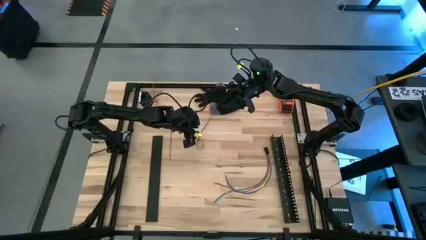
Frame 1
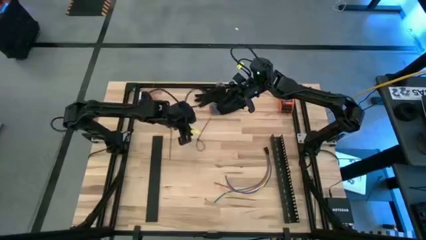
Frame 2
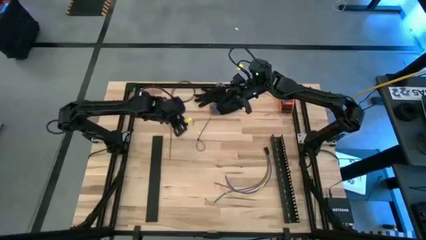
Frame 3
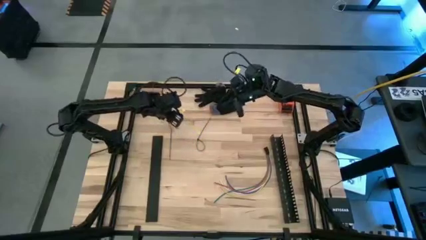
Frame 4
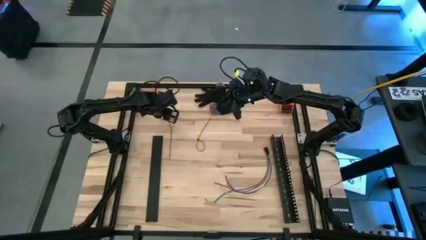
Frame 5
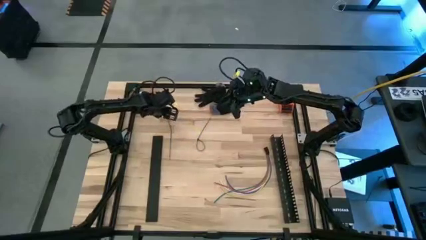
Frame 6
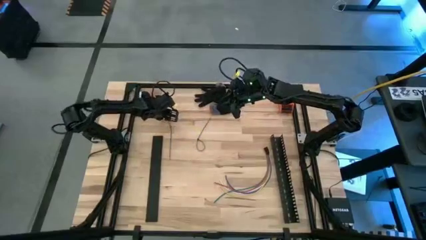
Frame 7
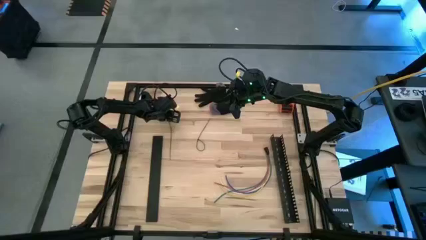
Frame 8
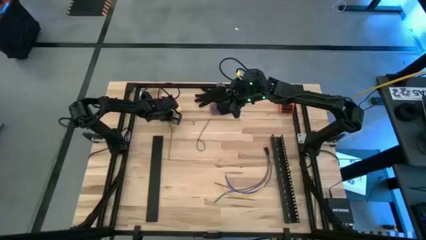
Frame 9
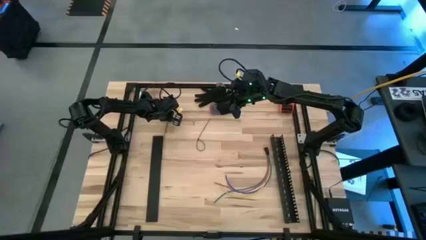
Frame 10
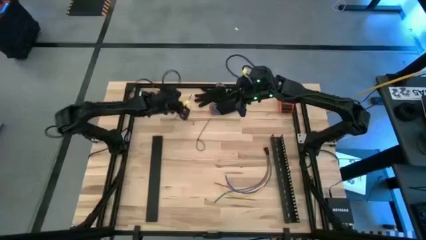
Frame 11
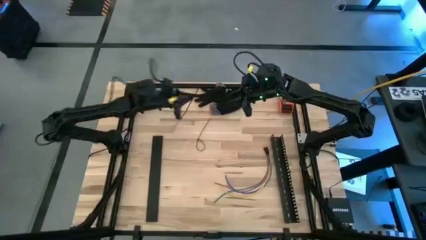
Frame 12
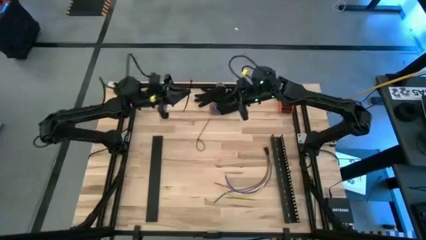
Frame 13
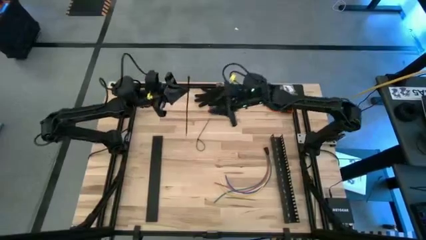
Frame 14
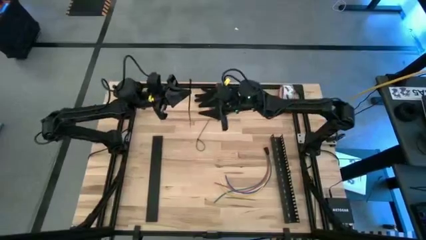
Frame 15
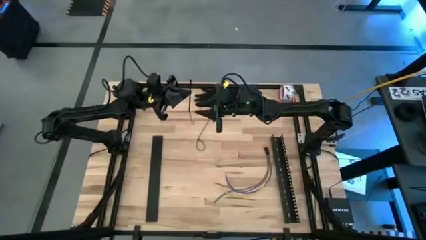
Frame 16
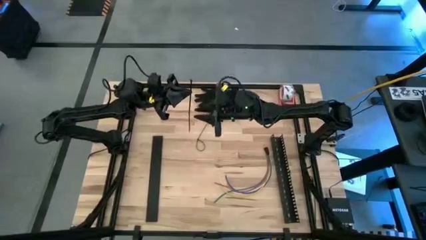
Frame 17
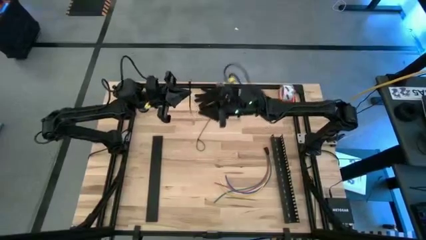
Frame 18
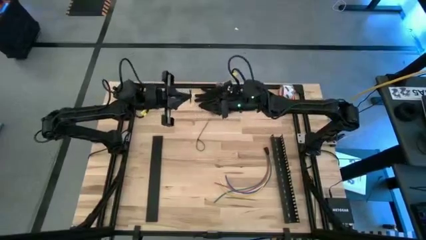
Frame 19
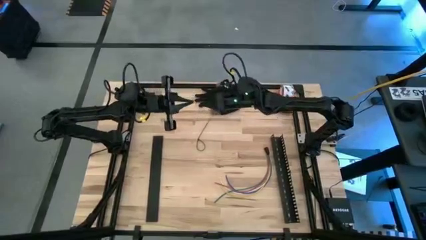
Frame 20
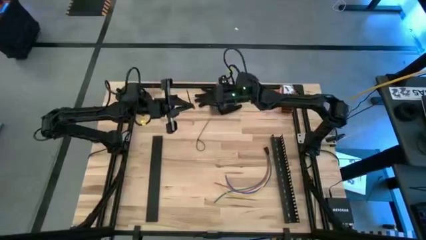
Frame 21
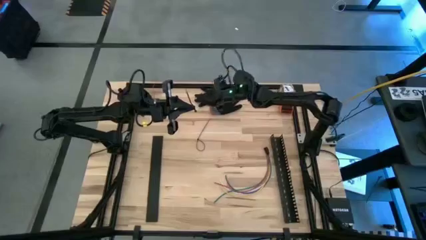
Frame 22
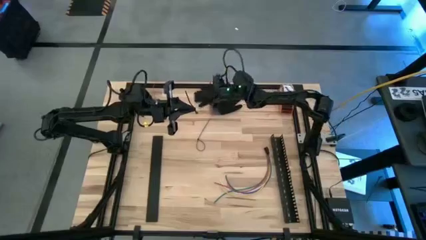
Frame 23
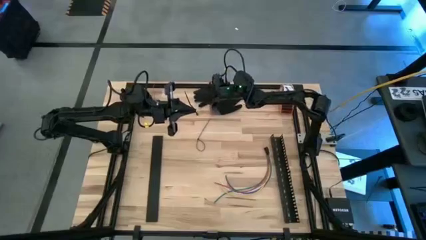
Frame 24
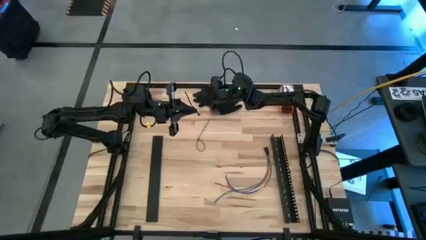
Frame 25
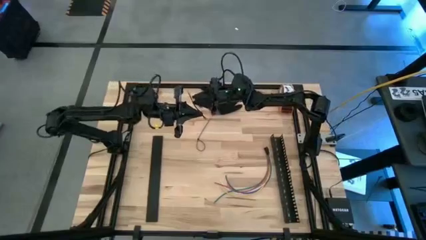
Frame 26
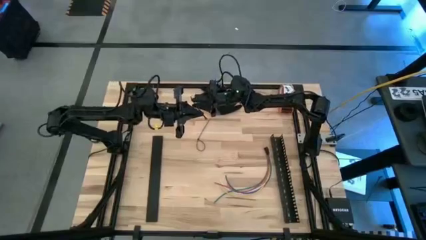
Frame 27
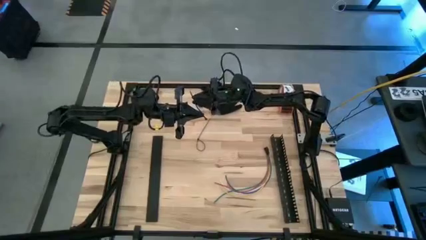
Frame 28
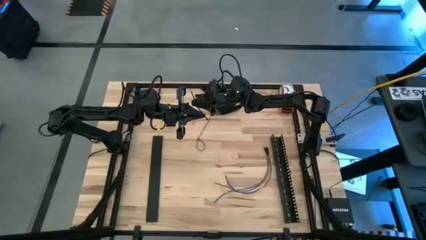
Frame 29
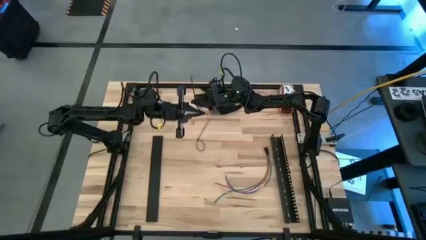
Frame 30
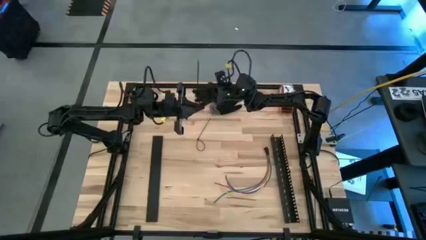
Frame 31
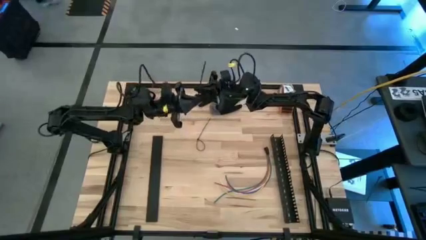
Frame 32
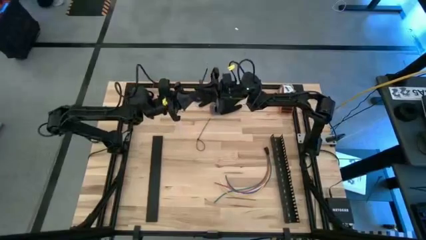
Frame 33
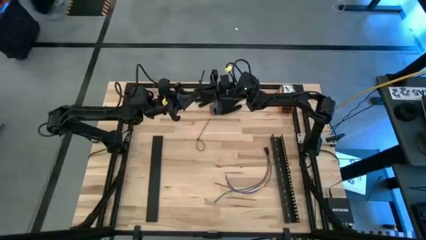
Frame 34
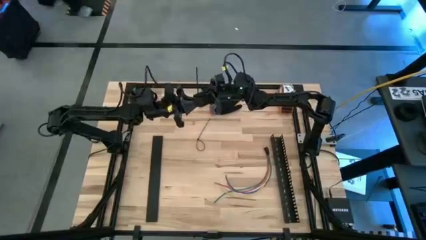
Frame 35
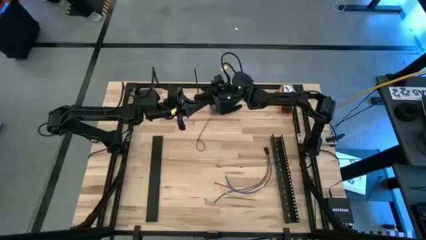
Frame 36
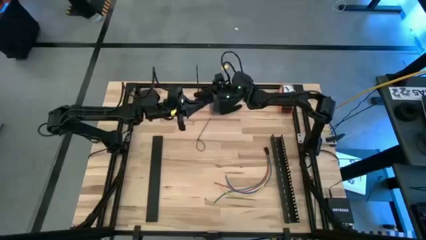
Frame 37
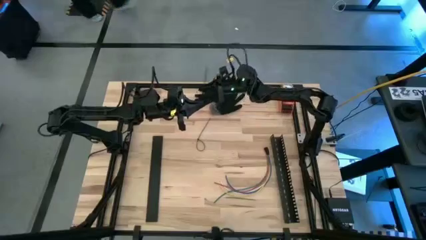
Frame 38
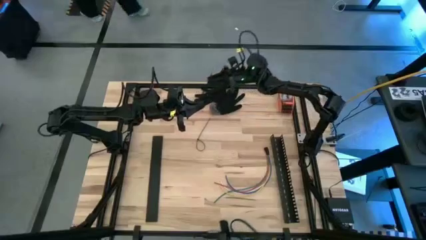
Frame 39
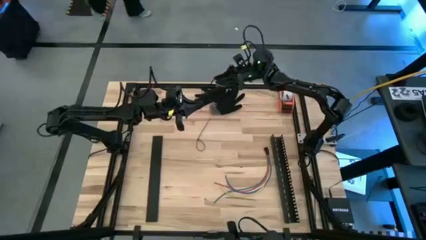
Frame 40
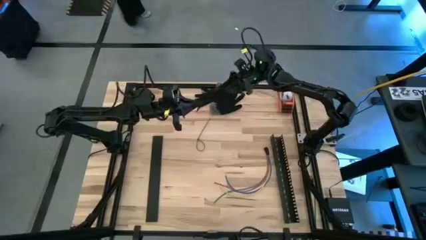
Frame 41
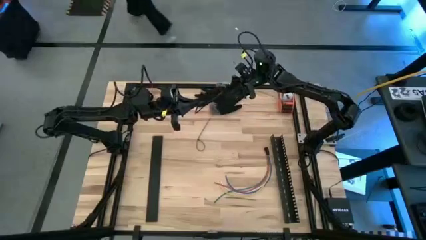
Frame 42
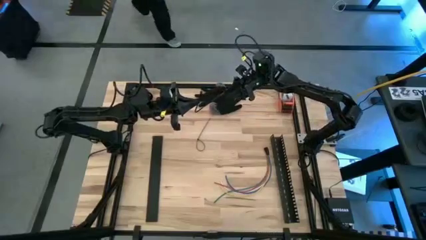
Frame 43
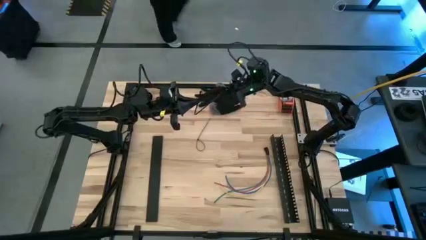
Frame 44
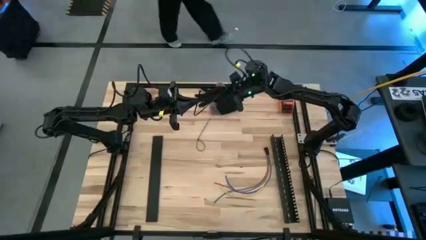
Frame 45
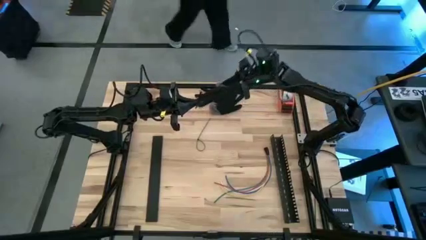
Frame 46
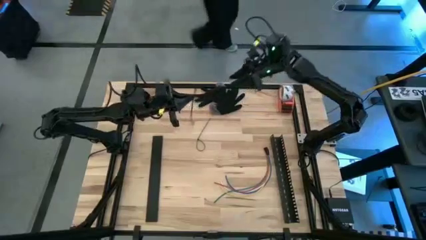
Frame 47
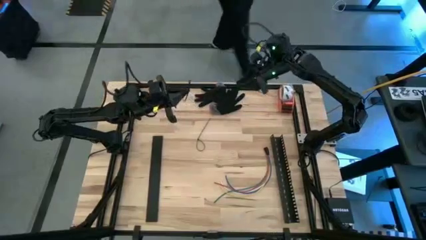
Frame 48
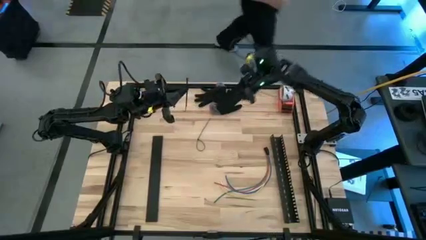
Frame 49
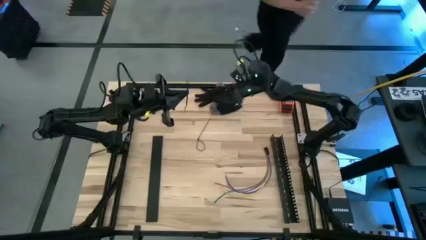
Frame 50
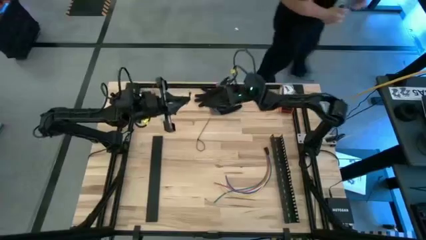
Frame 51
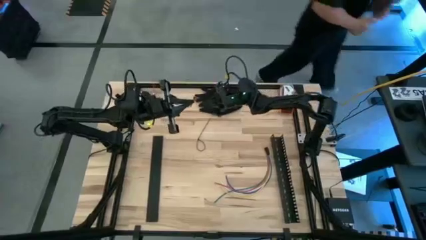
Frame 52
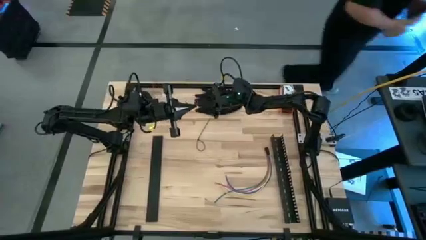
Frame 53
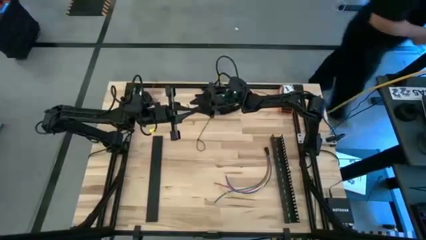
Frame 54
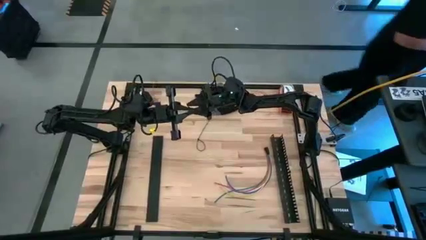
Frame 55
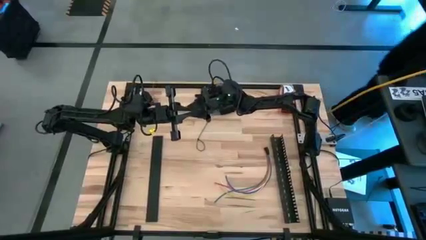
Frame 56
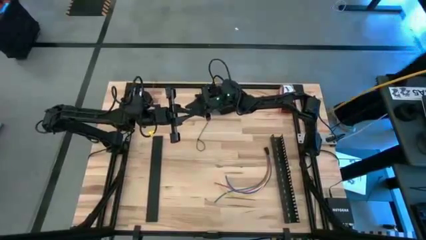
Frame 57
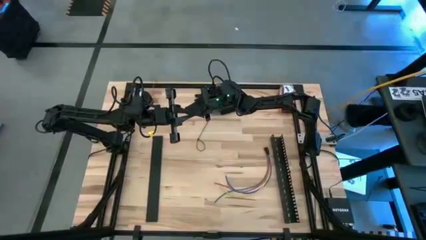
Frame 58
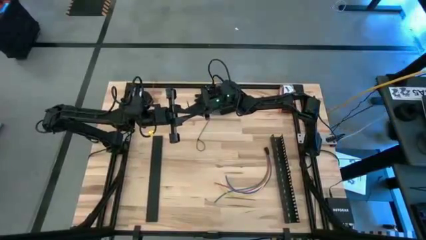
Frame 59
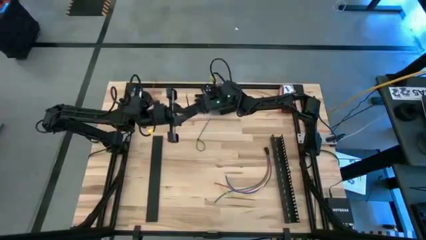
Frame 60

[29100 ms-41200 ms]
Task: Ziptie cables
Insert the black zip tie into the locking head

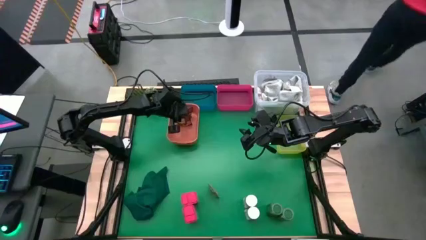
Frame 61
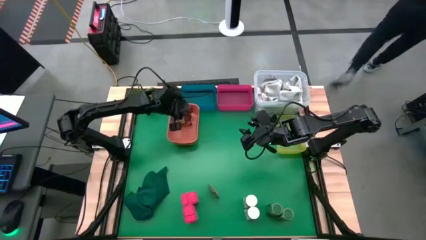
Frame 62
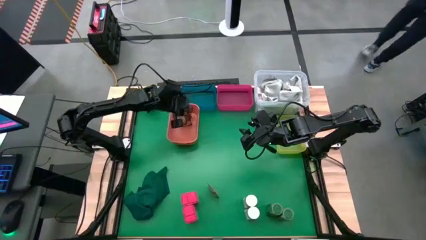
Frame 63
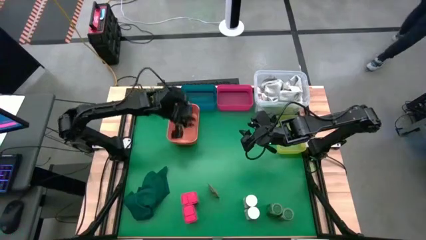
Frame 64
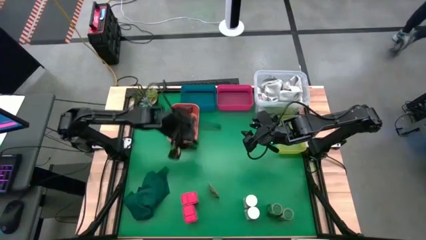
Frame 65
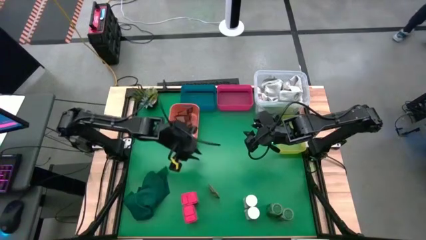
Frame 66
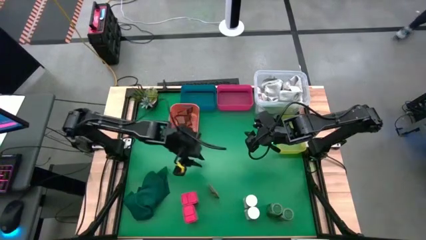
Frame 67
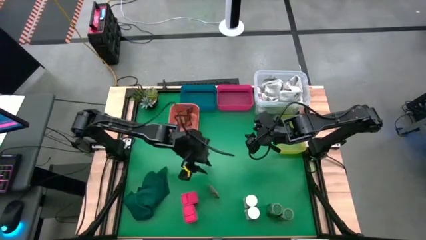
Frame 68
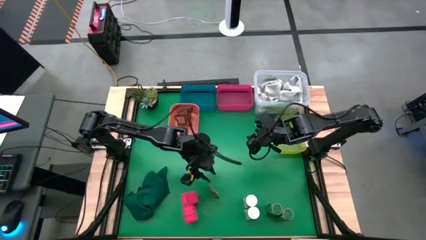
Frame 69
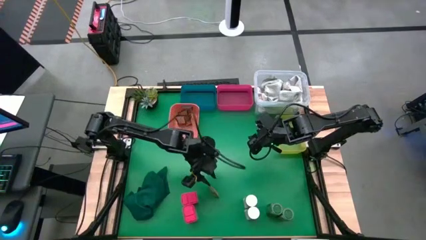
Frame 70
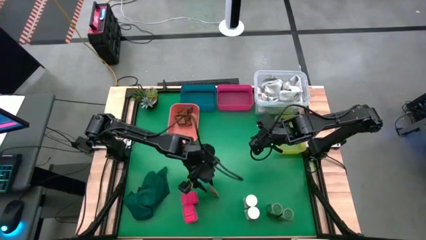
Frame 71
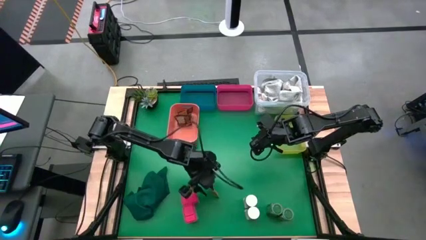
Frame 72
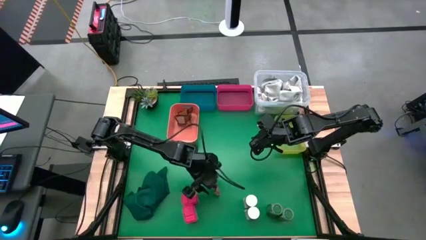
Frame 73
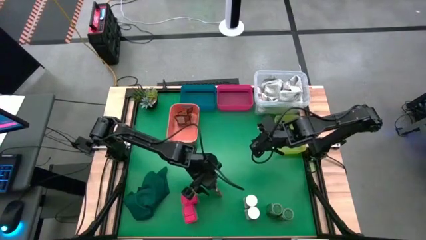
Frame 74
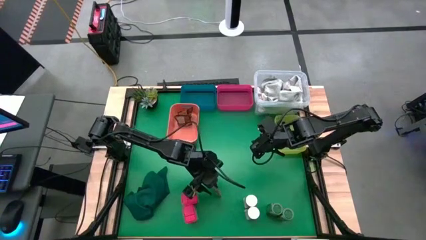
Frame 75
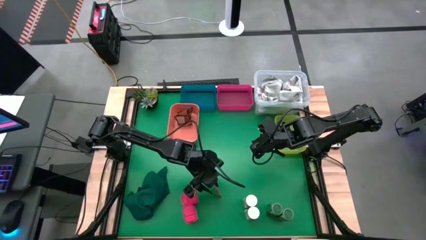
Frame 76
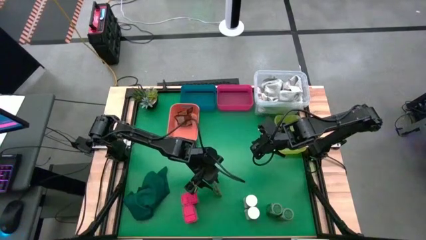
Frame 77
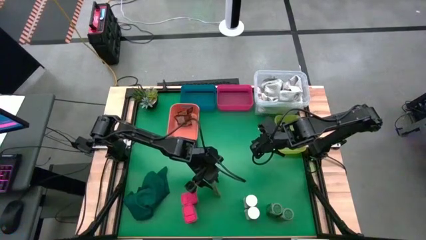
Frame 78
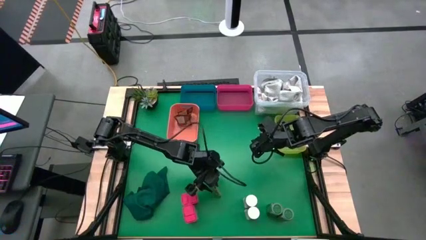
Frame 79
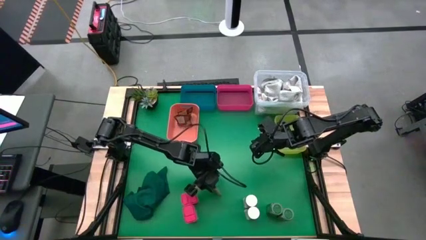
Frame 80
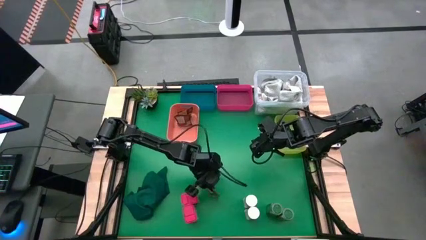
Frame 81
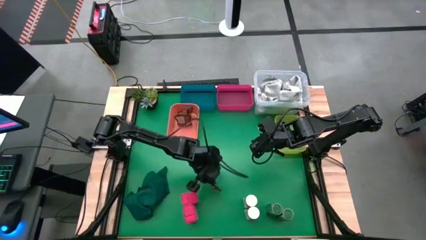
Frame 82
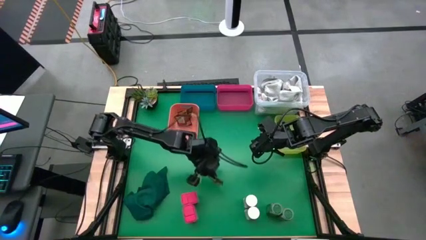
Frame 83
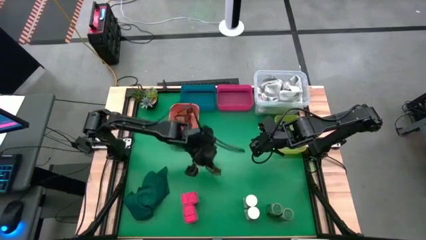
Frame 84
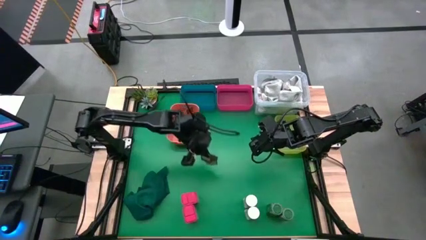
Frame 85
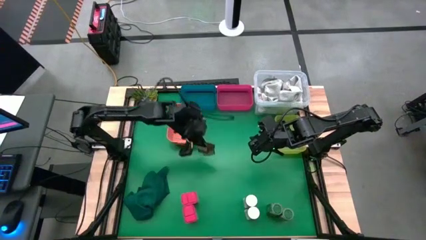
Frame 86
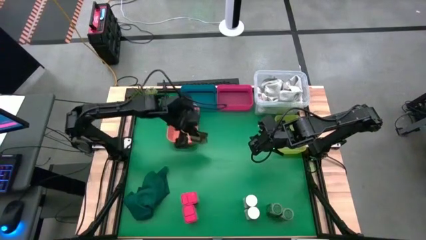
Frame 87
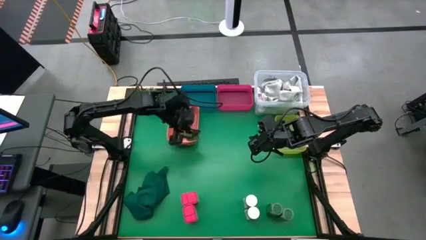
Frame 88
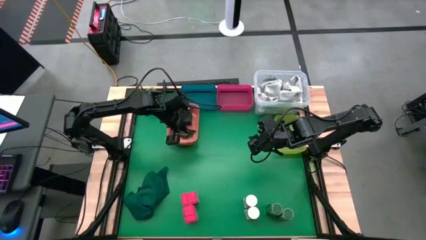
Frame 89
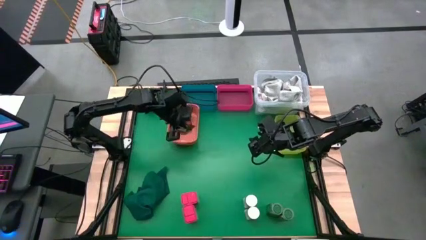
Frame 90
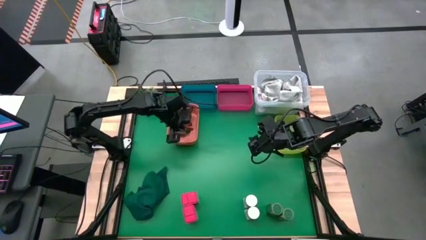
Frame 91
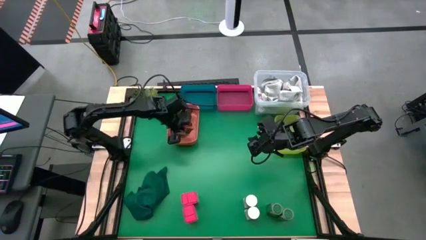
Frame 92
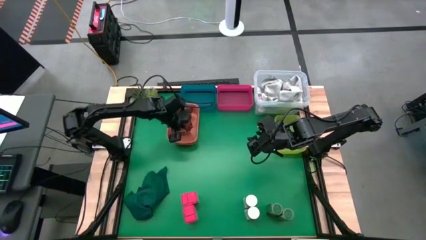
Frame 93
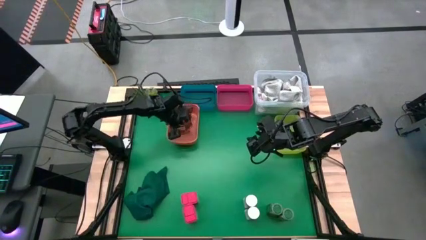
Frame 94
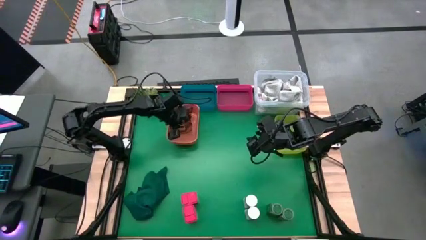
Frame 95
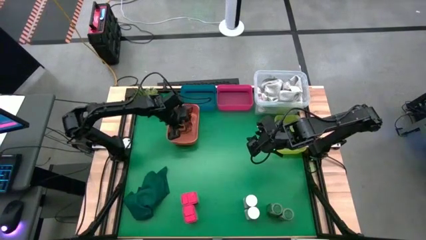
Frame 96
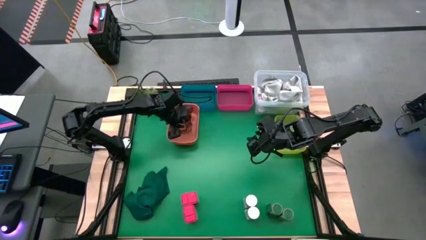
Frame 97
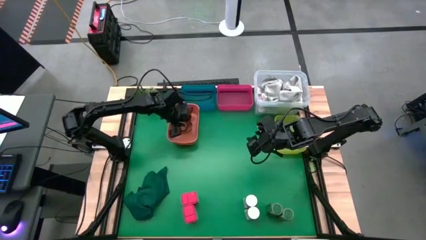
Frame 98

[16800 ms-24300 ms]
Task: Sort spices by type
Put the brown spice bag into the orange bin
